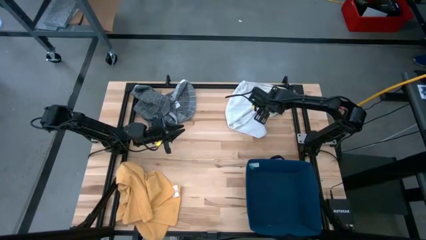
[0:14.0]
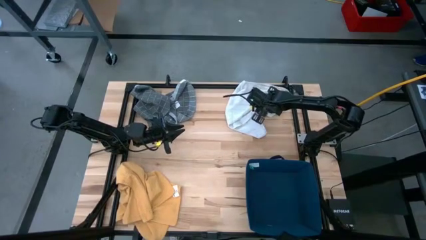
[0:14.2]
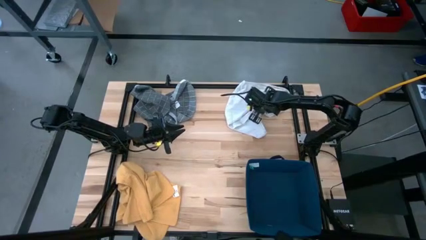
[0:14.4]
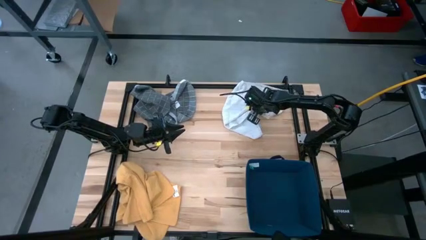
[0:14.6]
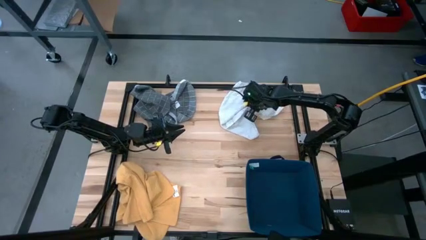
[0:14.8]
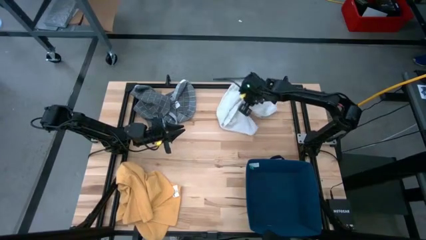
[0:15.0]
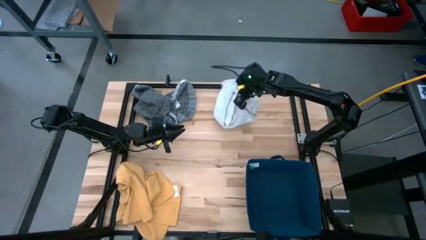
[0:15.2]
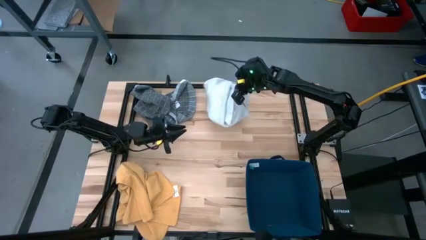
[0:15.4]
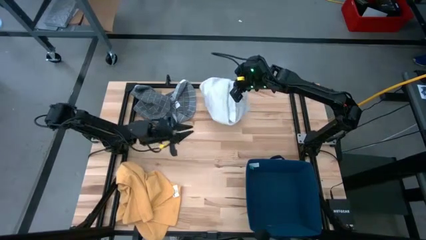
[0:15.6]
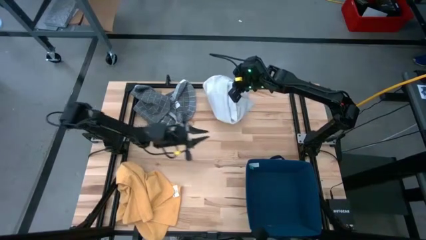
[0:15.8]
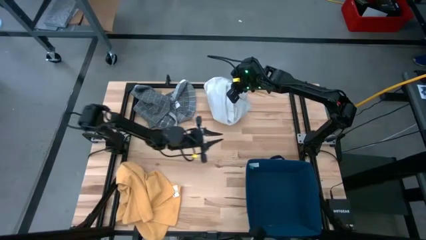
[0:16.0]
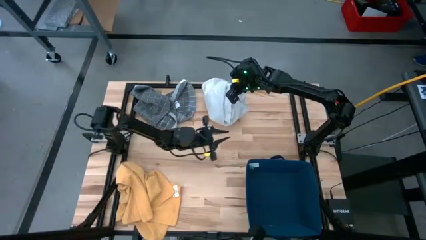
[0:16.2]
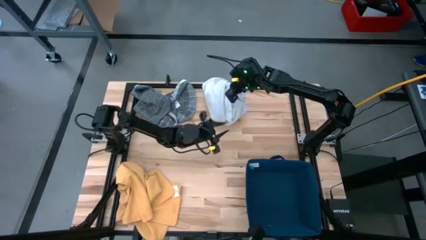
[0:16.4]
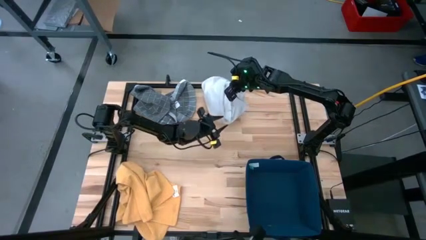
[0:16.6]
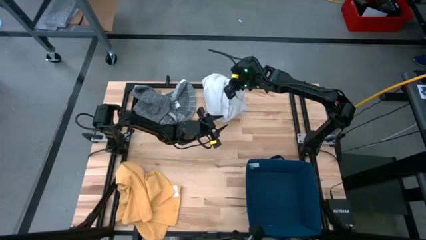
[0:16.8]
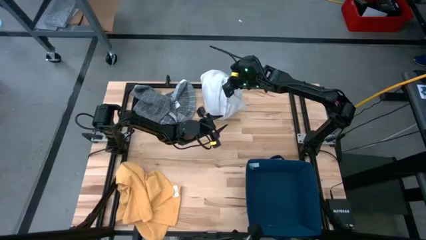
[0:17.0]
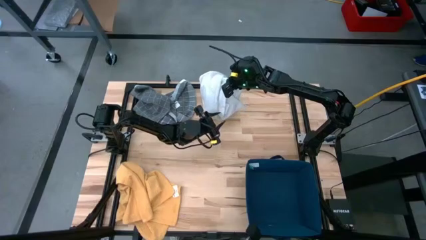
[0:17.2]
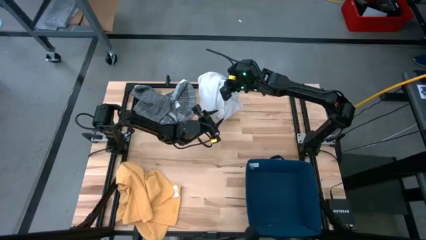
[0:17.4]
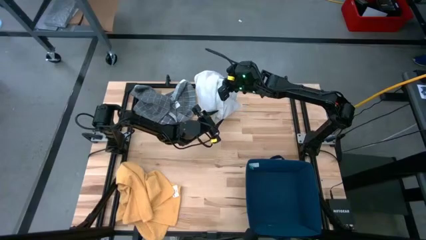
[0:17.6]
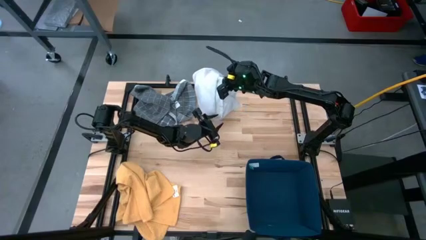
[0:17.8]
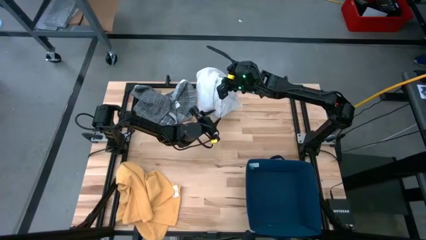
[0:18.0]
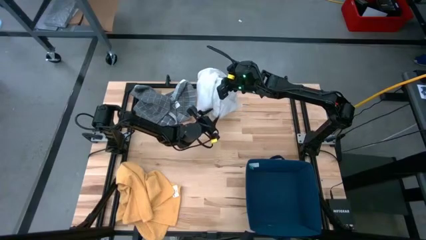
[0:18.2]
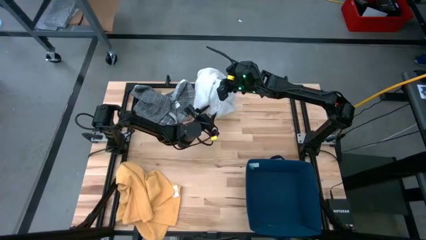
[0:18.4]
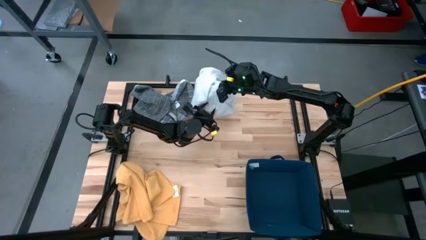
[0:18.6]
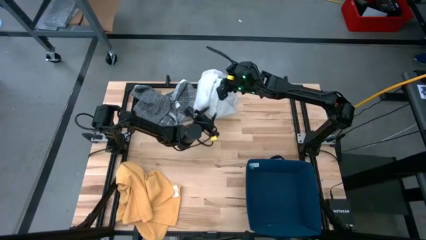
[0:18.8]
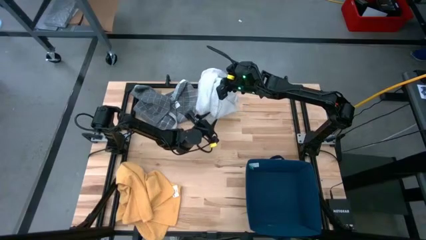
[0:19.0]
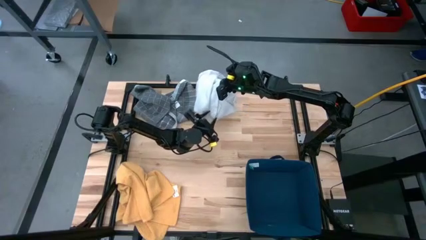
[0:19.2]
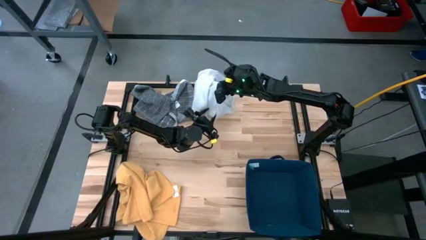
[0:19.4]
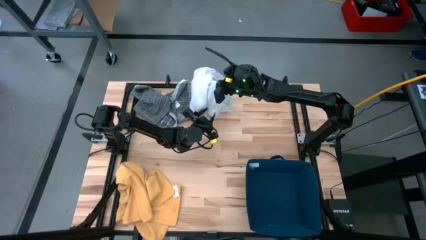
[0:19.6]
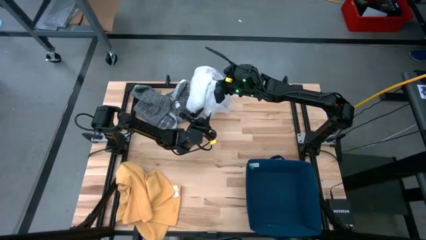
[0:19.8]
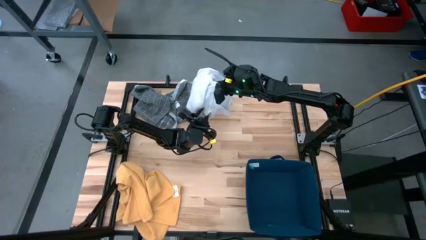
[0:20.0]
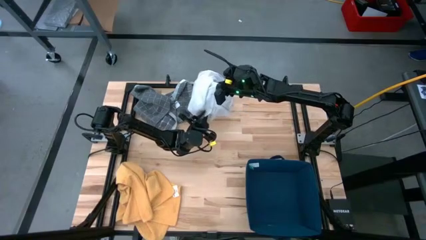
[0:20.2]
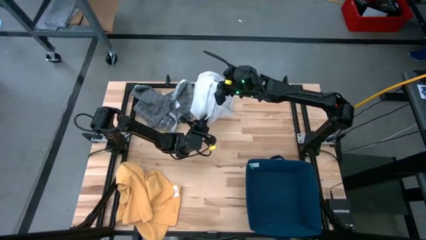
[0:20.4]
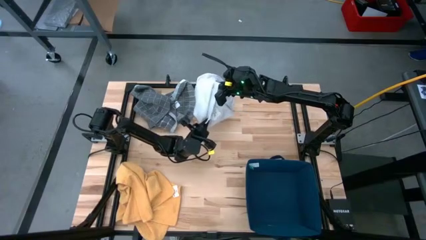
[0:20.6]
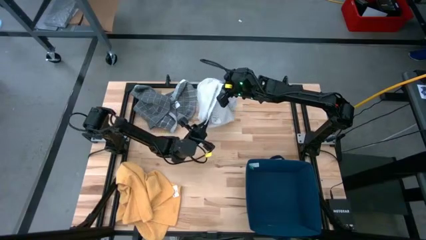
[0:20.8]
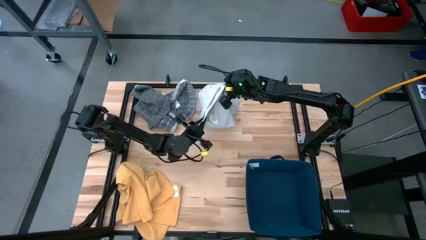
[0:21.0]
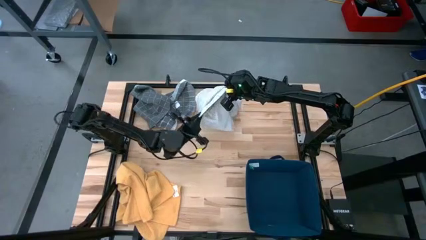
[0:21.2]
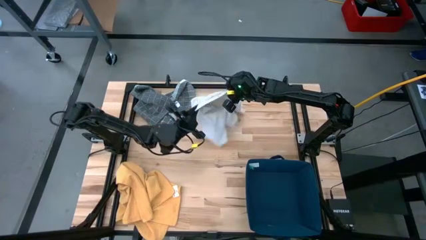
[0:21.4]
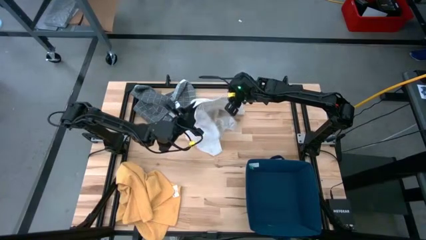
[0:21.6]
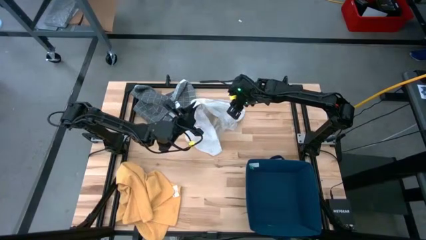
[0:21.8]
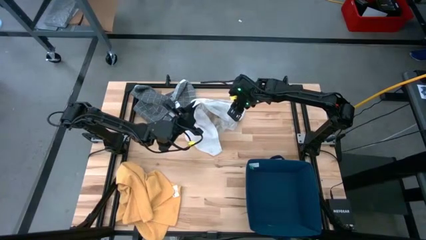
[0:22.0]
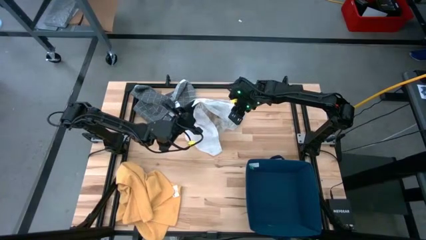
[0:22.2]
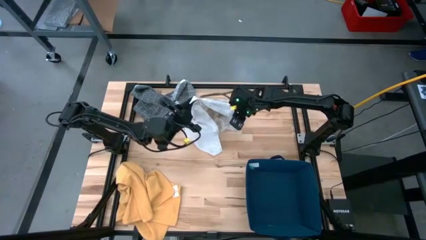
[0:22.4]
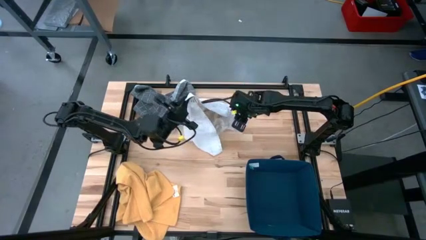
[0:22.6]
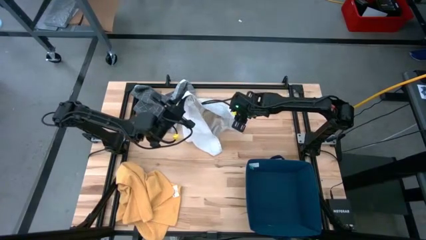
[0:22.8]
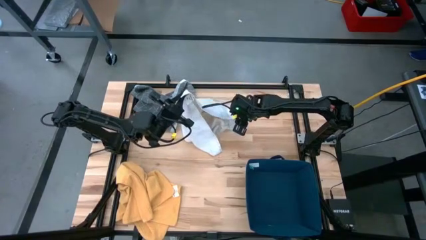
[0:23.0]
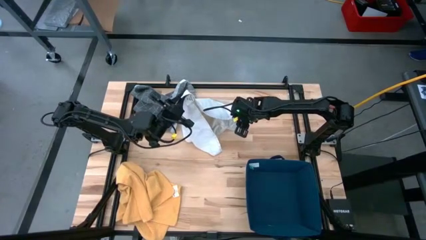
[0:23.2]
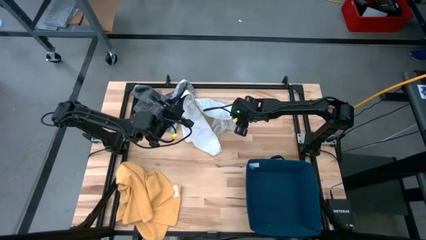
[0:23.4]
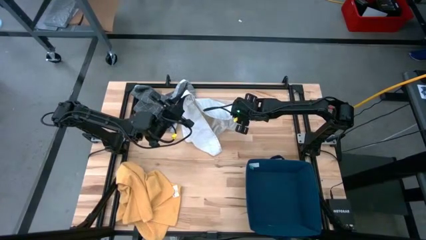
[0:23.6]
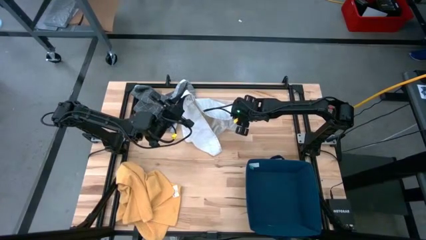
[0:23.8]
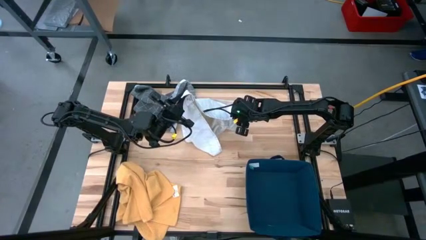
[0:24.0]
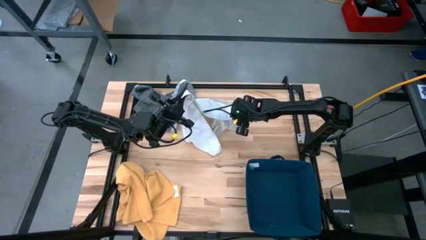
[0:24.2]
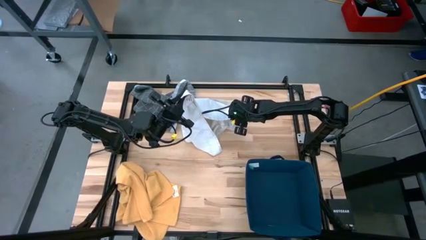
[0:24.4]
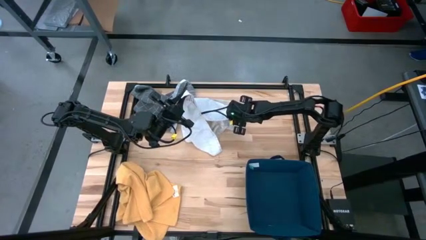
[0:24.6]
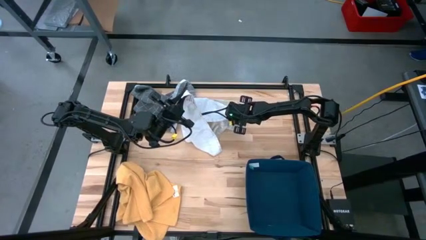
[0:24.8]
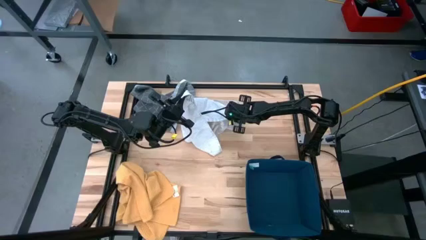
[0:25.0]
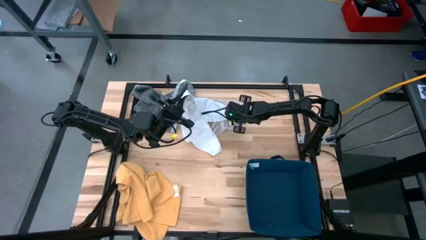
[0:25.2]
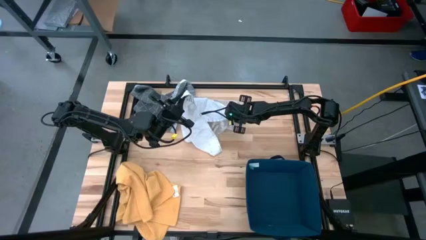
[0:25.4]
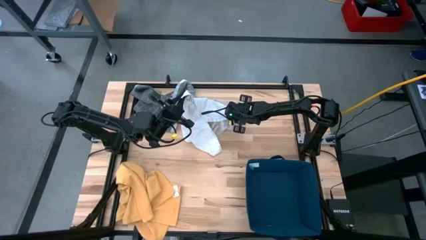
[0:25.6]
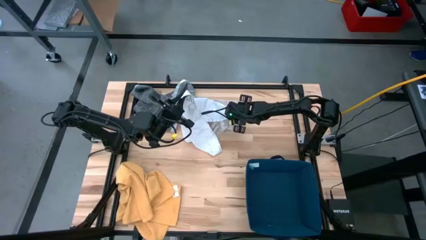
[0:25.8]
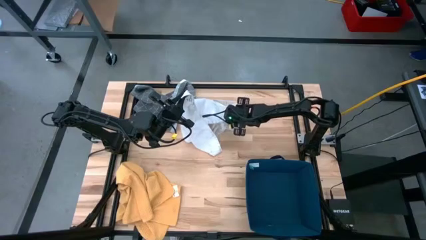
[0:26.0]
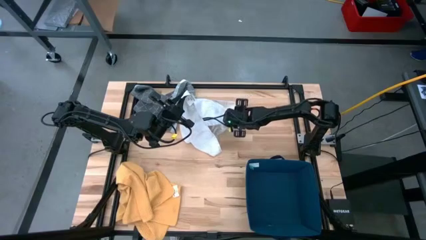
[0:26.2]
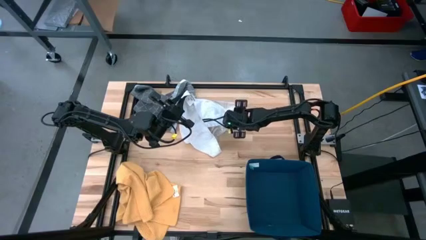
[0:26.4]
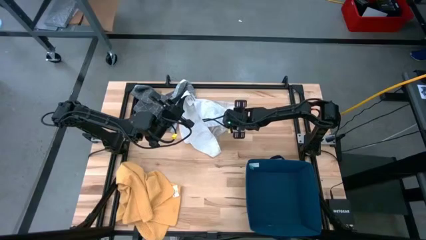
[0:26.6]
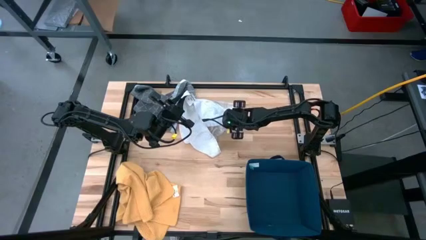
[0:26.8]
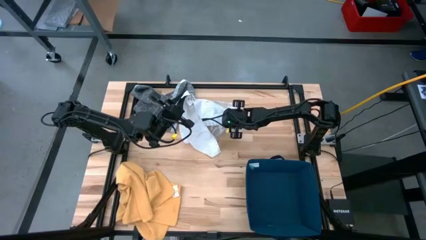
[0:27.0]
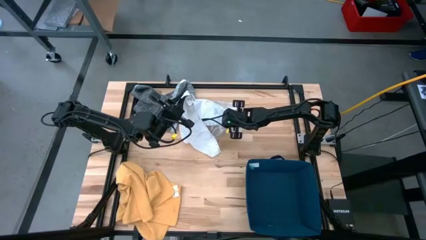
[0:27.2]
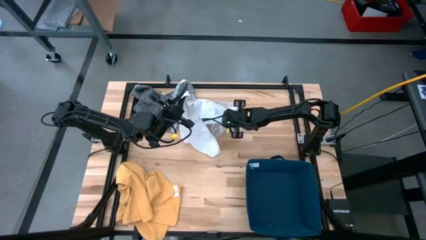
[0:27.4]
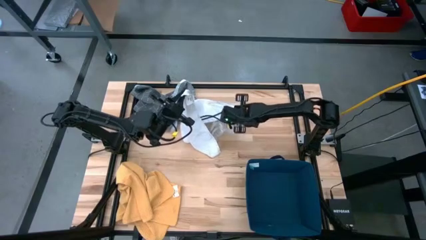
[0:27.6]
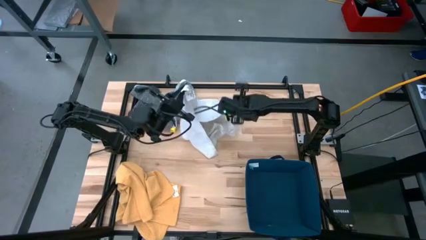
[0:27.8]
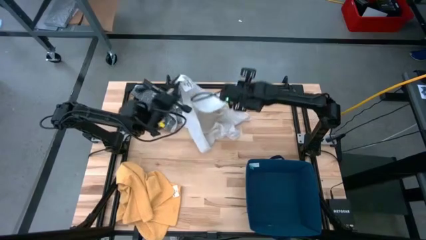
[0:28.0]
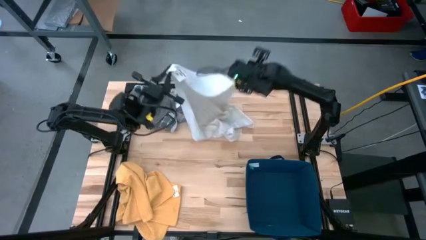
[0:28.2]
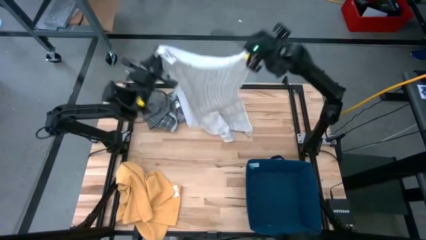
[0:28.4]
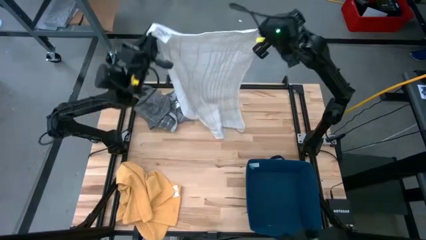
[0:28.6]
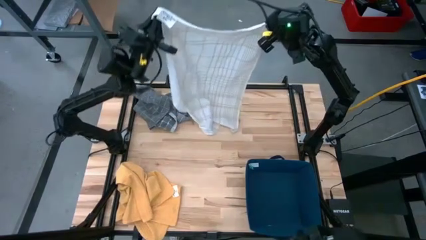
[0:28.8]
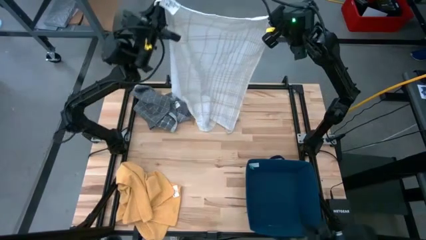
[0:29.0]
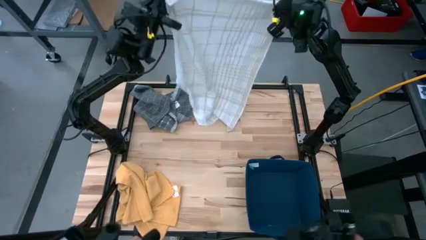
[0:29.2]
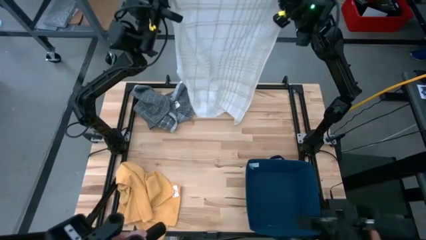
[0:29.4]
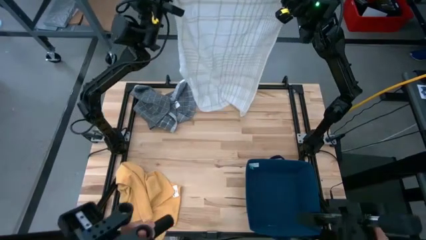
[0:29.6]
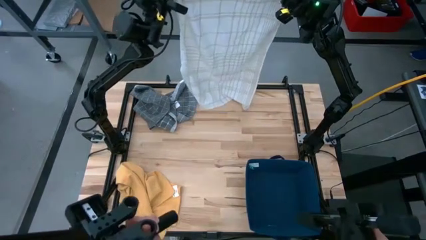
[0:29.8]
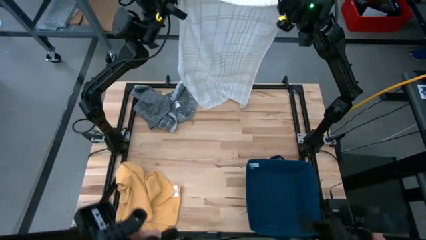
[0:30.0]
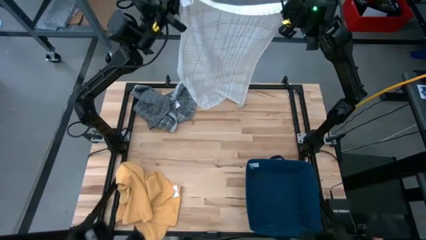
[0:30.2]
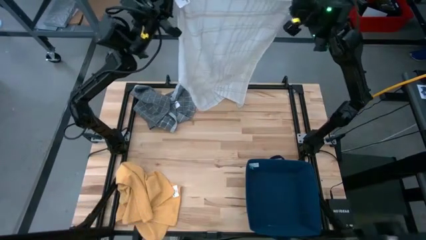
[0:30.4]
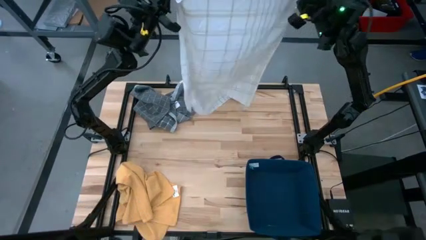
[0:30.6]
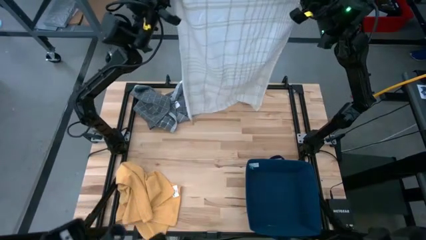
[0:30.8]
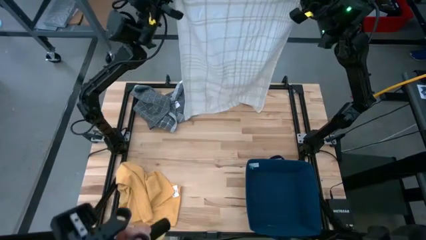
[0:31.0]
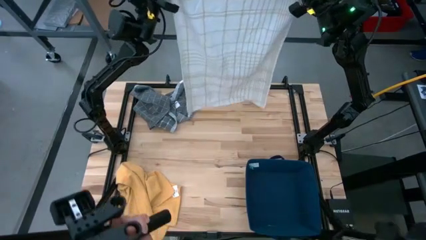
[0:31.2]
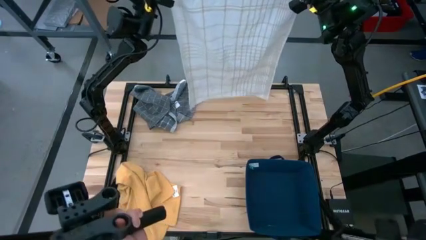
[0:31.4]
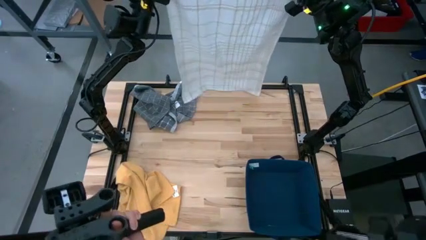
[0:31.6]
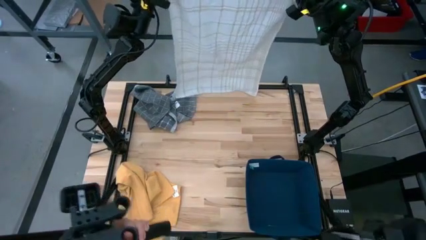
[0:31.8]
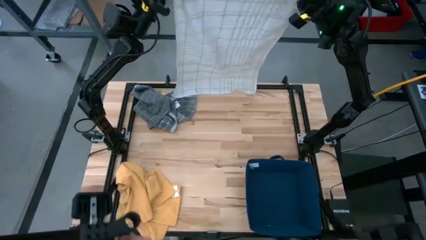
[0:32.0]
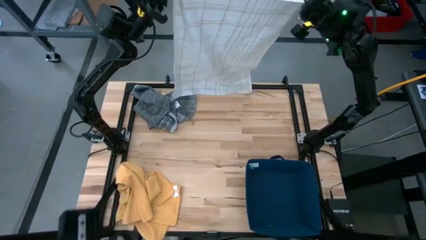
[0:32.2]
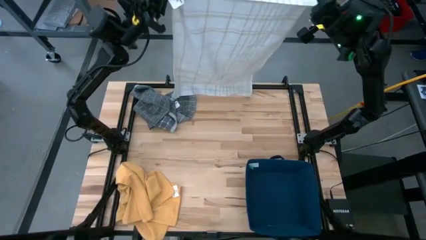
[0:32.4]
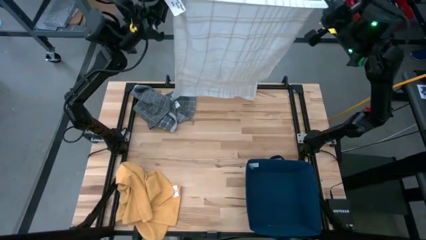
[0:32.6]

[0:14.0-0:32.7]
Task: Fold towel
Fold the white kitchen towel
